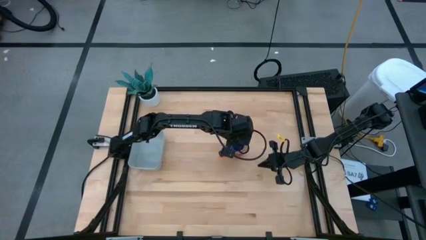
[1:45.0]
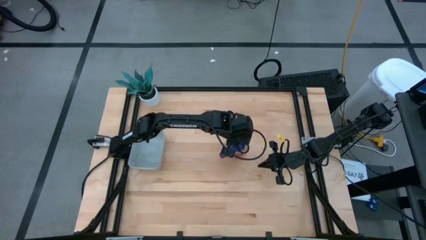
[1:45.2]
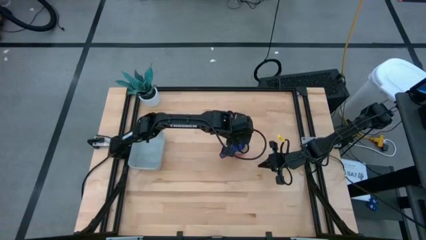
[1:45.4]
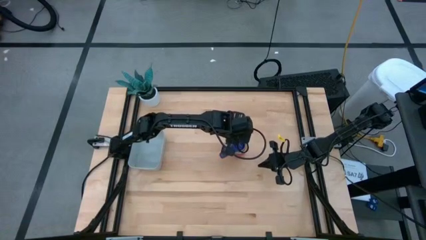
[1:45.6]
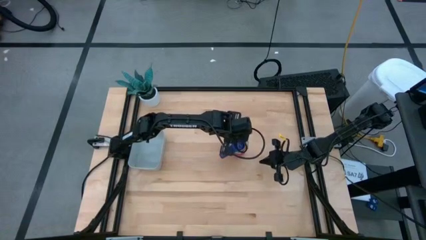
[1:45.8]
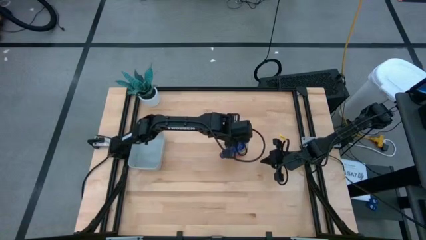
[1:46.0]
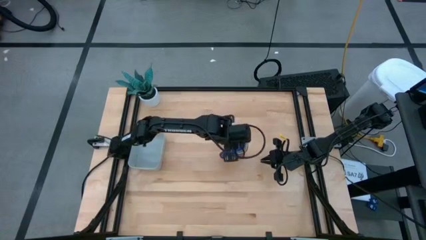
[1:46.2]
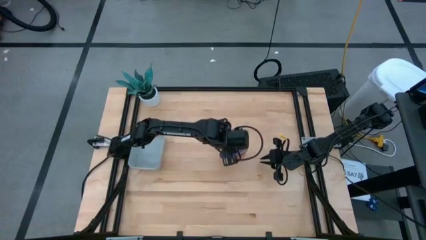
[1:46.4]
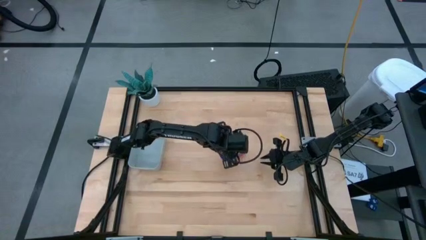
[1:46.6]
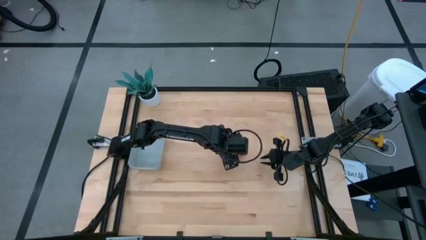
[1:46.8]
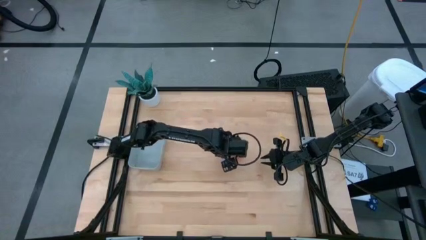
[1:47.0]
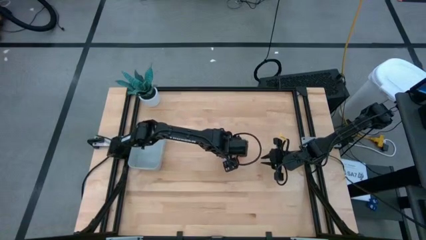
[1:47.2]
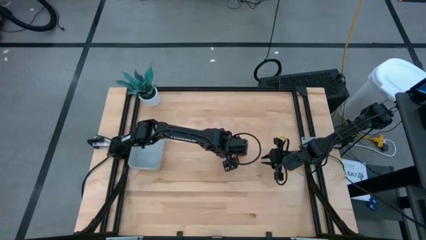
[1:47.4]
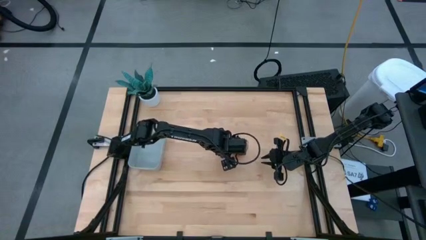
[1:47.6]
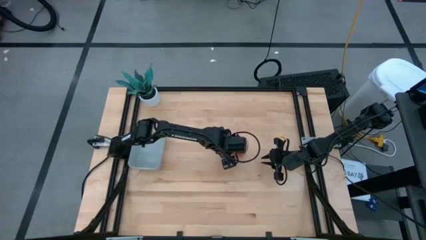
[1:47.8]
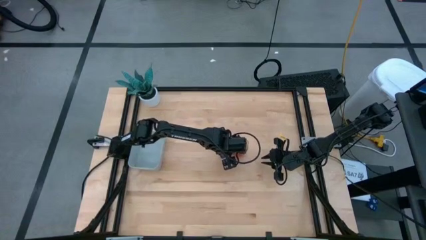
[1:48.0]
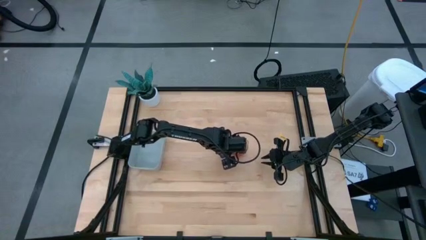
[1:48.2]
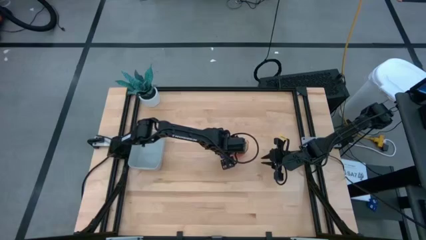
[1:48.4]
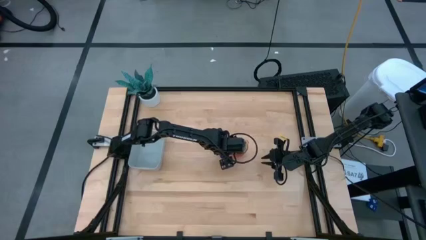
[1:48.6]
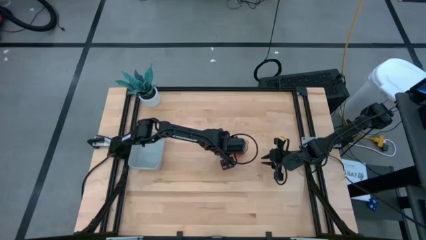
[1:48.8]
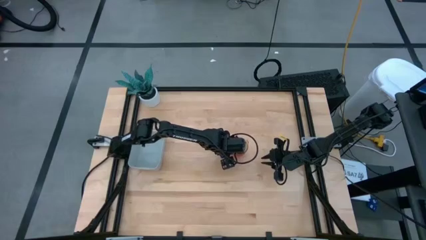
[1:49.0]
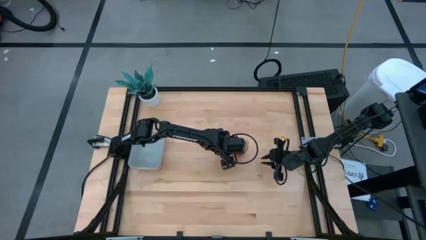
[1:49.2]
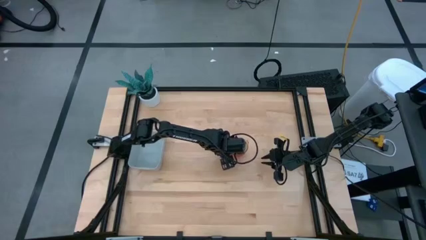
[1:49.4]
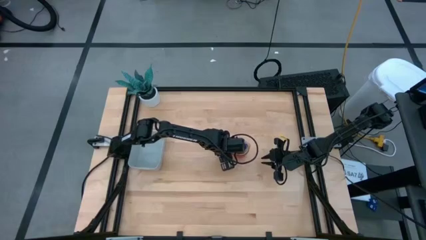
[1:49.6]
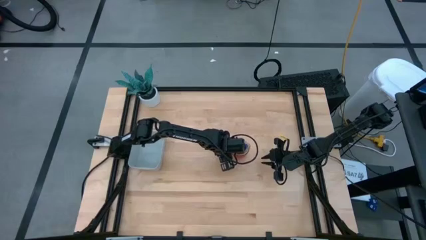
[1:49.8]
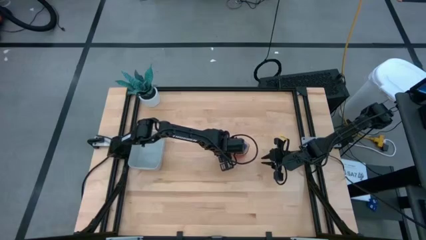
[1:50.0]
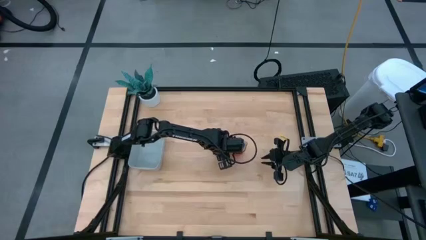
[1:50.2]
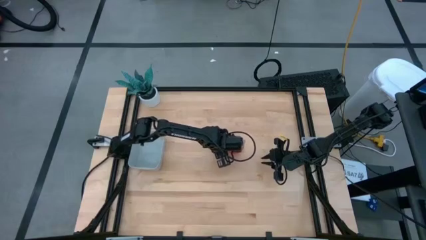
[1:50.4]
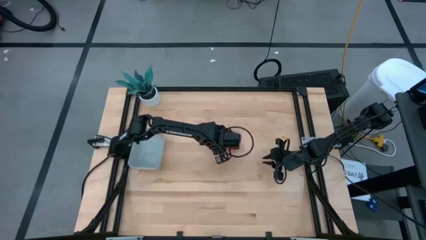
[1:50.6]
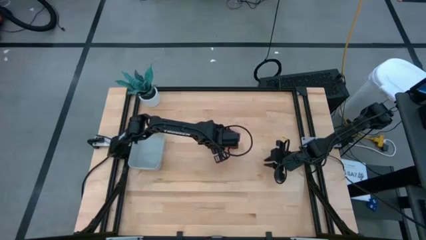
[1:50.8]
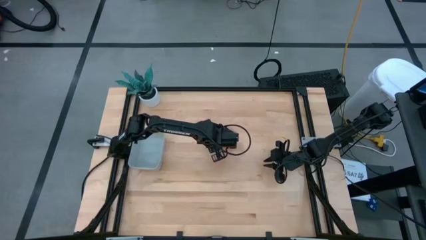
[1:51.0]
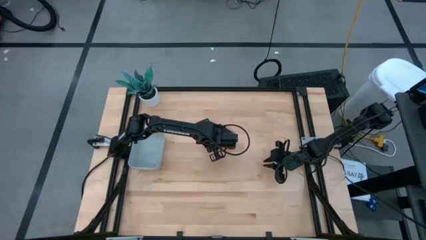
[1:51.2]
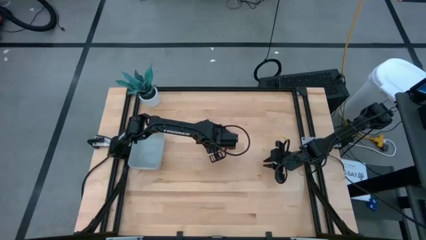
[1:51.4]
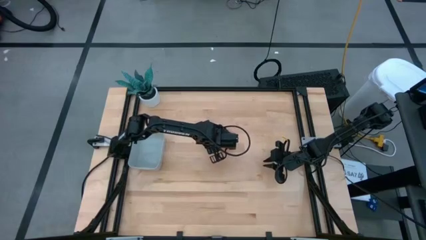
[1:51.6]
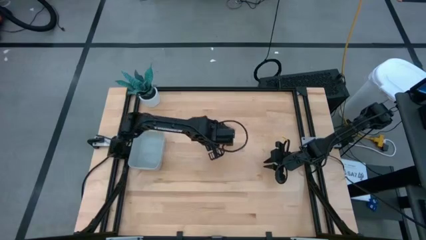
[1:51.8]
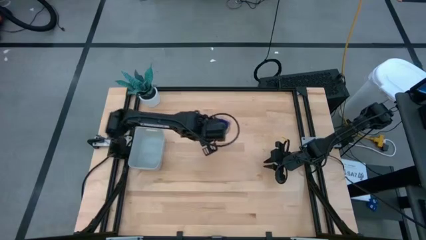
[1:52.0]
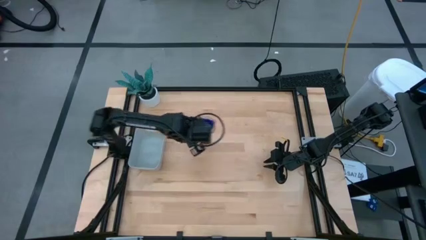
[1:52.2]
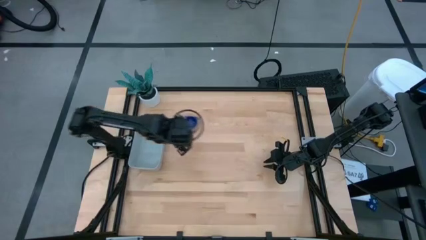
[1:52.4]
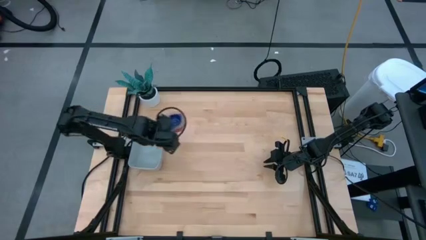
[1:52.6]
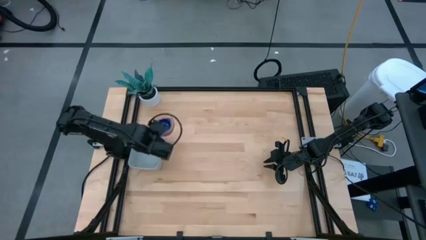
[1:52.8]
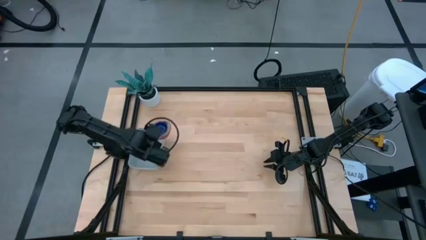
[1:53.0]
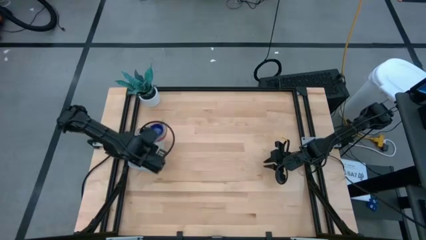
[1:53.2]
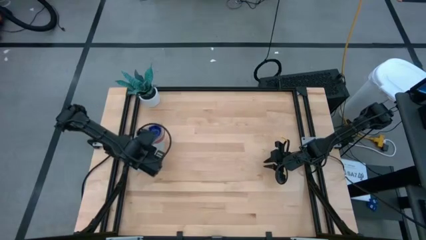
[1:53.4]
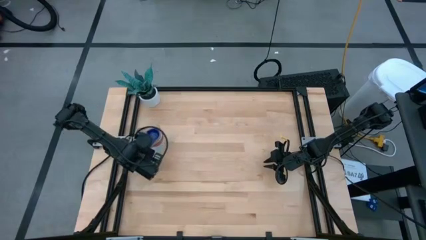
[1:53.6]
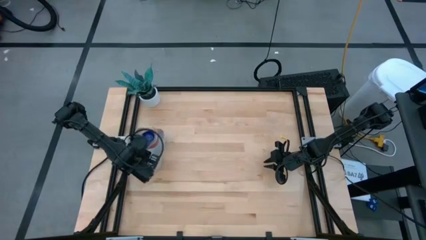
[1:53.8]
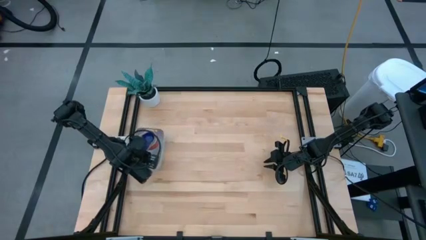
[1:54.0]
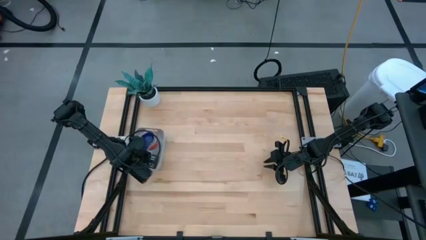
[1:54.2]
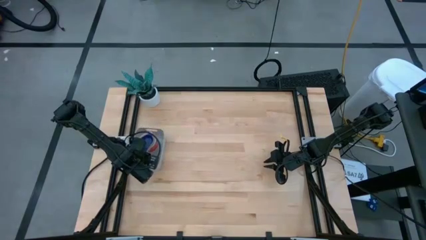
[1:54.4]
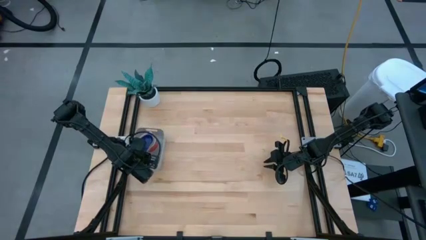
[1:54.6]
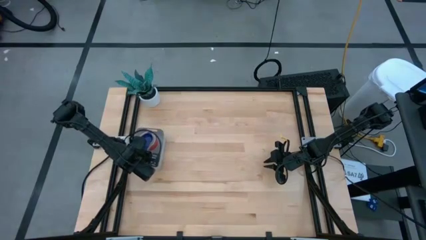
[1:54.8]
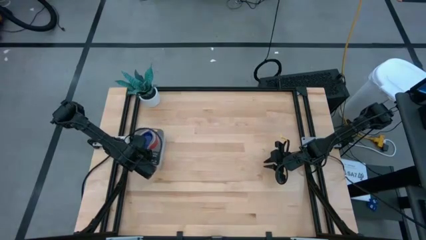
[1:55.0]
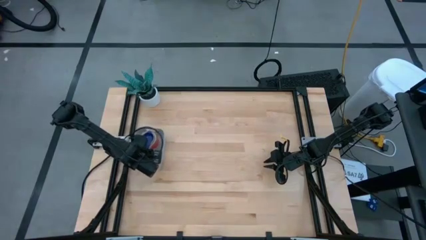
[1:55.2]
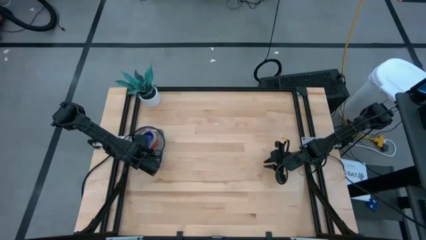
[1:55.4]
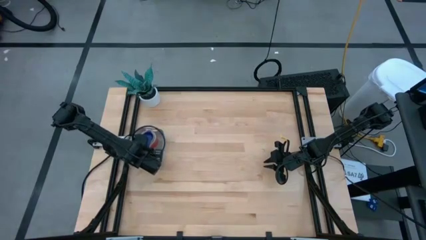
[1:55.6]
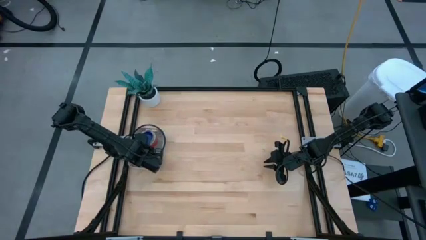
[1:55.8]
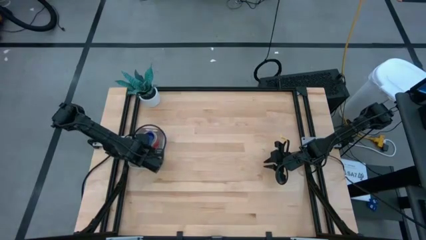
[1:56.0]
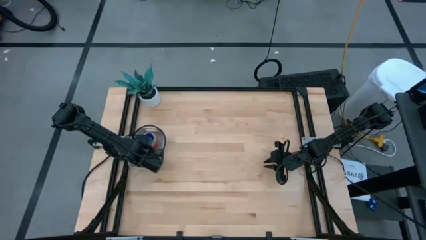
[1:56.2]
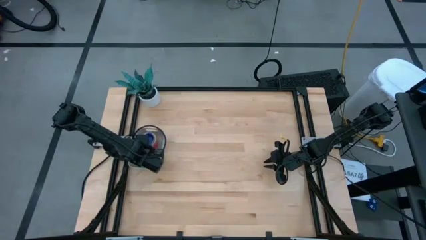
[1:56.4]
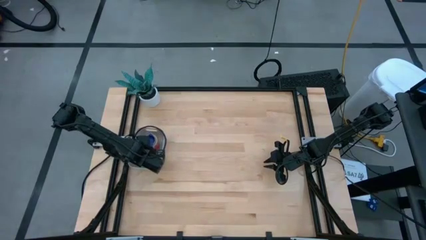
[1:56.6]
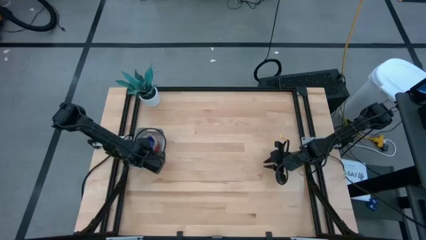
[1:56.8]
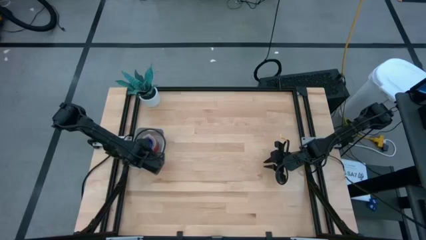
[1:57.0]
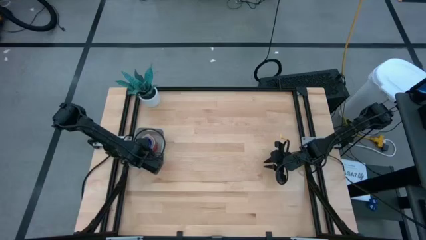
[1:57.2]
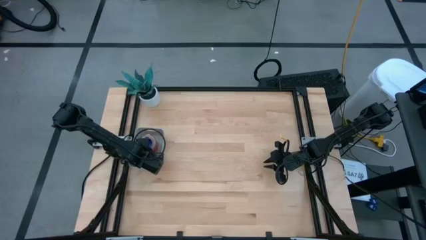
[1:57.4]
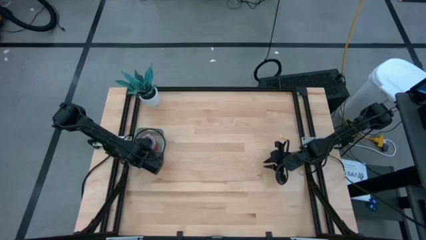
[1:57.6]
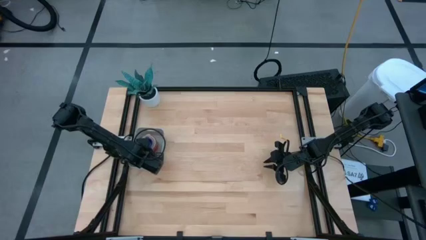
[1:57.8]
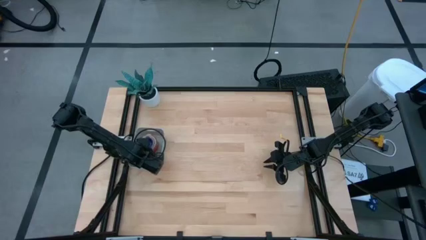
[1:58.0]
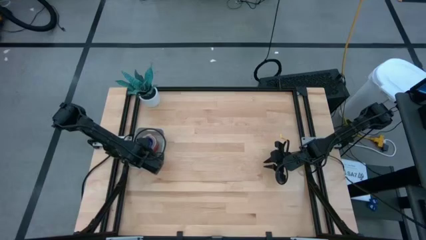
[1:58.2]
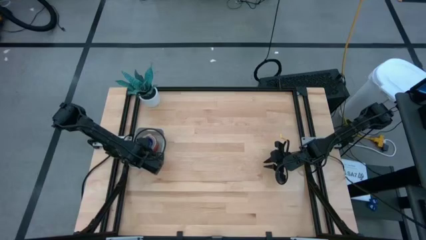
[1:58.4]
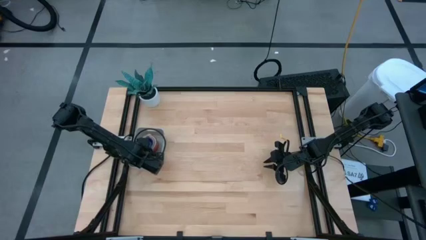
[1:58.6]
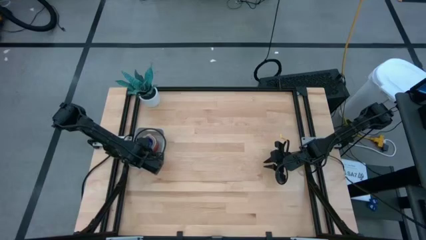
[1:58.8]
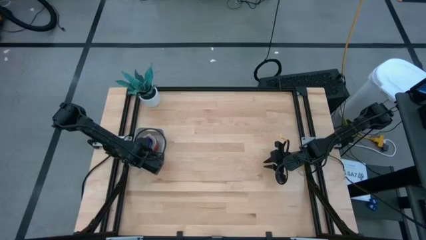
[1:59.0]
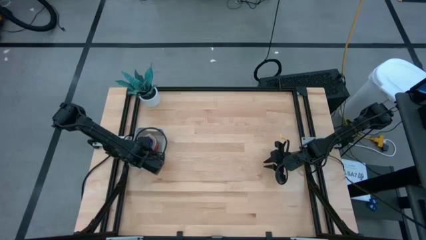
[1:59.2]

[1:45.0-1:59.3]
Task: Nest measuring cups in basket
Put the stacked measuring cups into the gray bin
